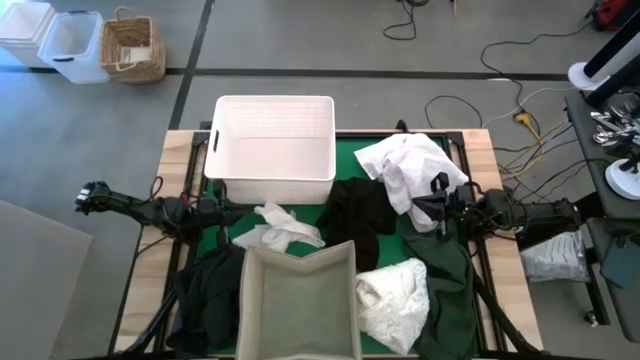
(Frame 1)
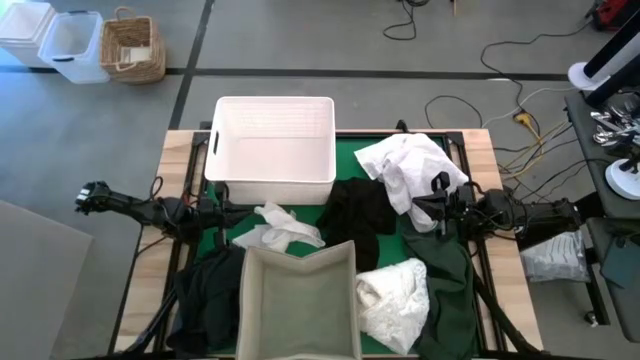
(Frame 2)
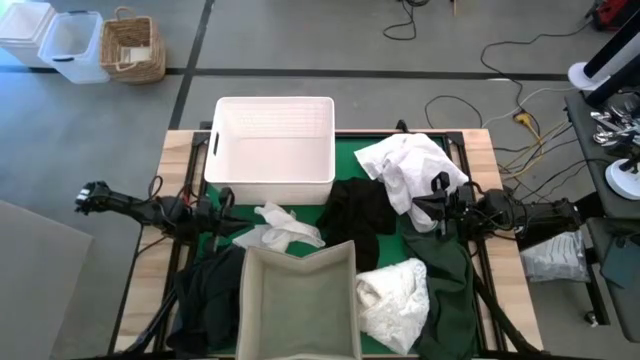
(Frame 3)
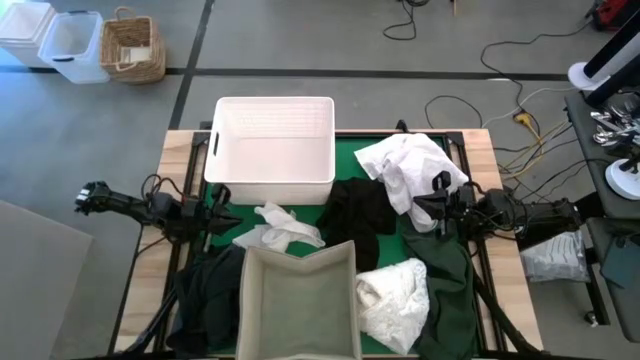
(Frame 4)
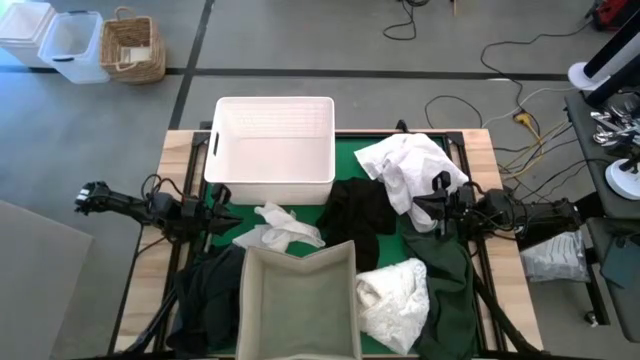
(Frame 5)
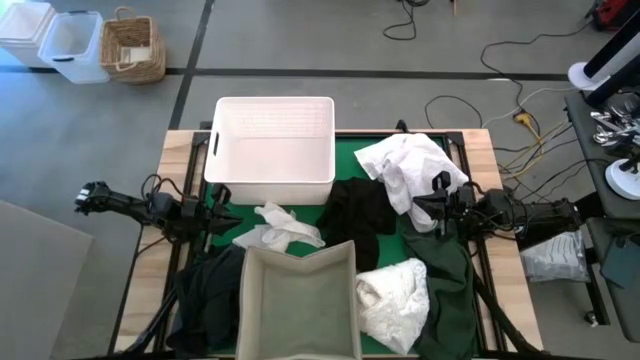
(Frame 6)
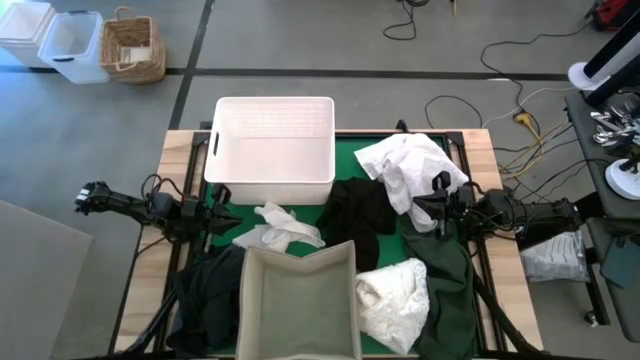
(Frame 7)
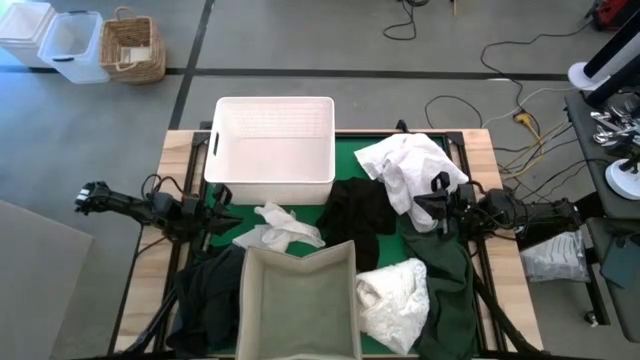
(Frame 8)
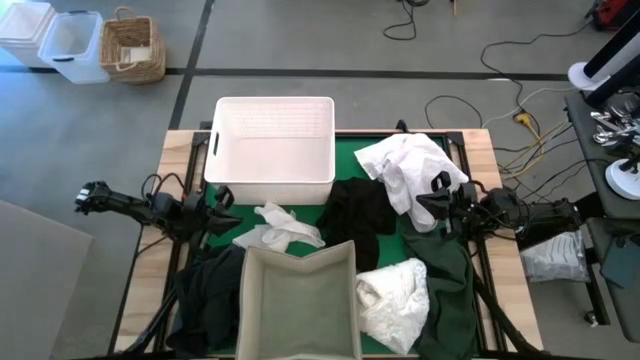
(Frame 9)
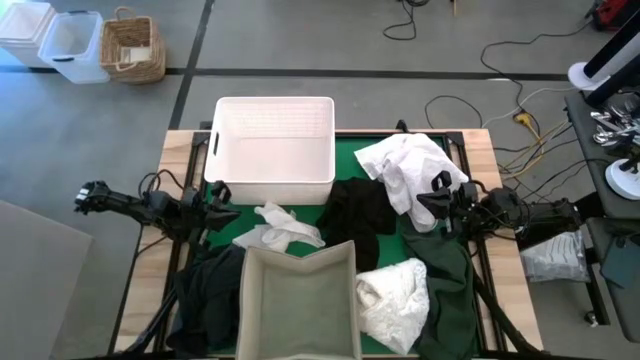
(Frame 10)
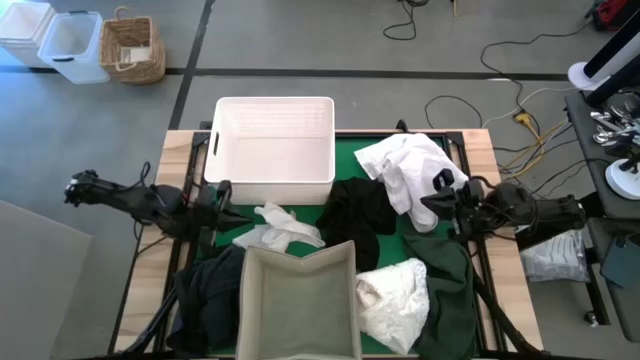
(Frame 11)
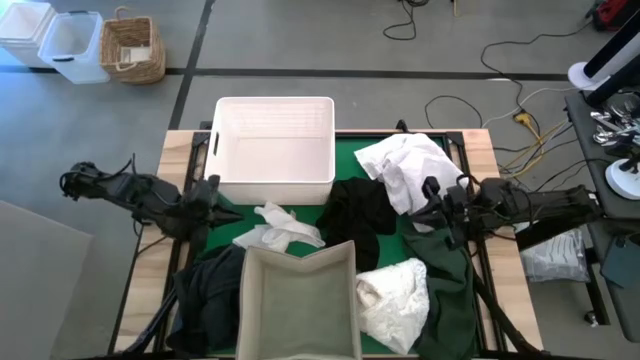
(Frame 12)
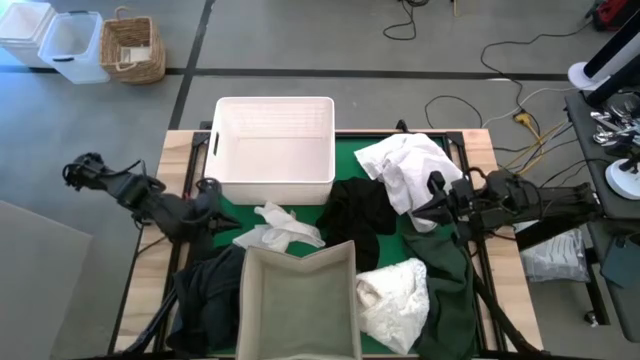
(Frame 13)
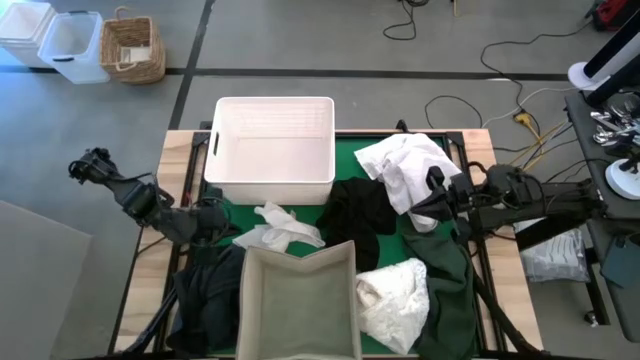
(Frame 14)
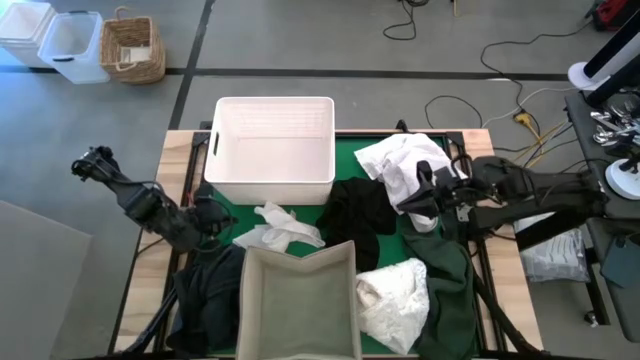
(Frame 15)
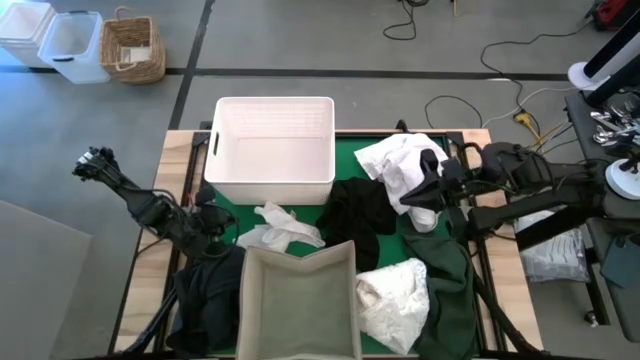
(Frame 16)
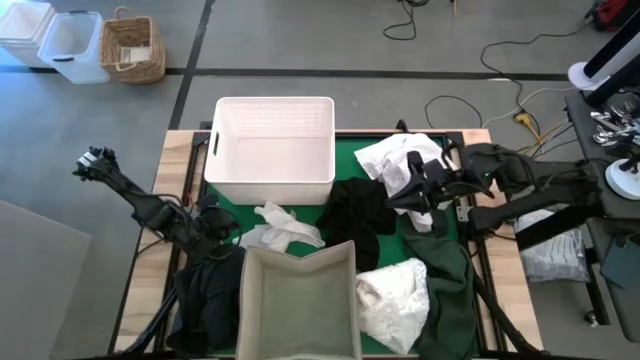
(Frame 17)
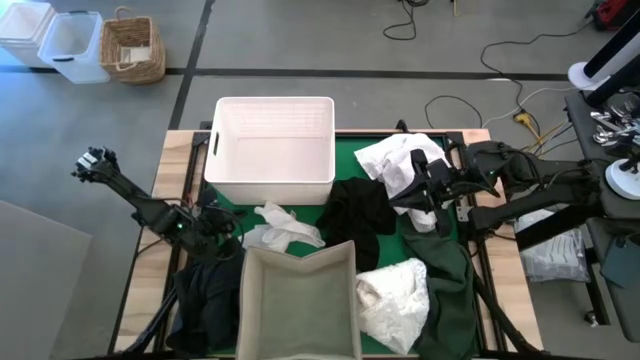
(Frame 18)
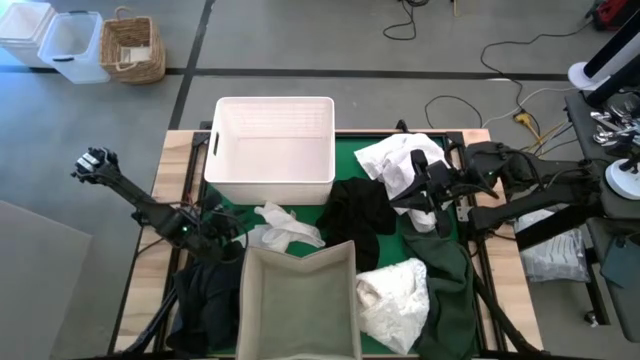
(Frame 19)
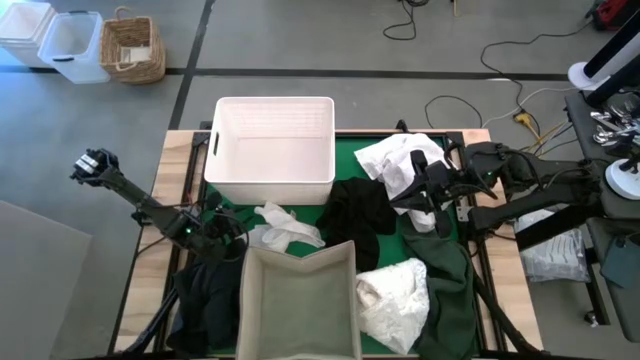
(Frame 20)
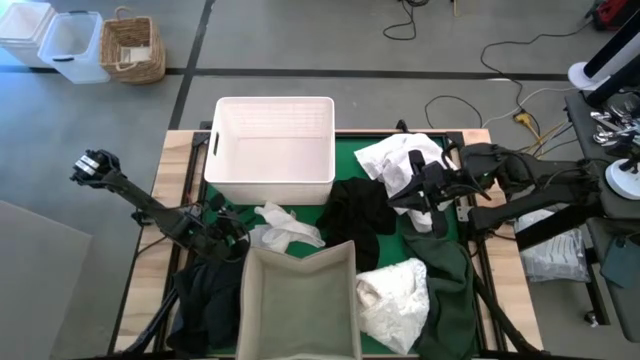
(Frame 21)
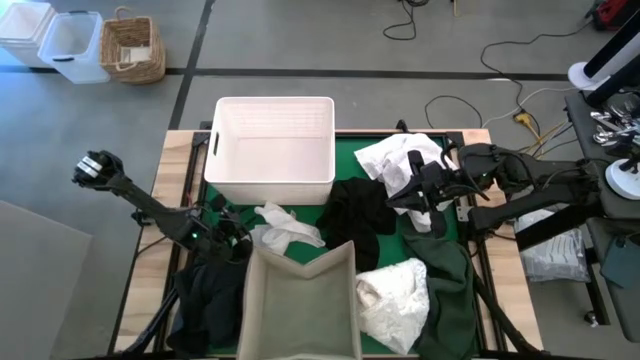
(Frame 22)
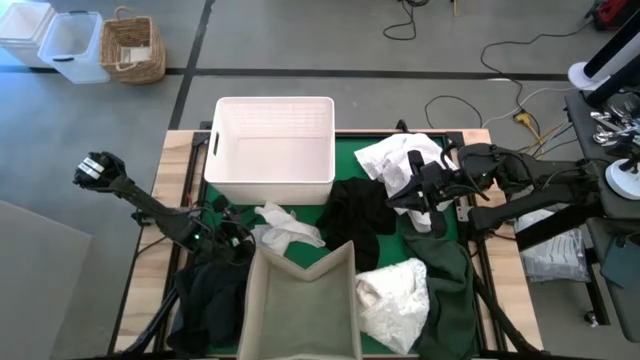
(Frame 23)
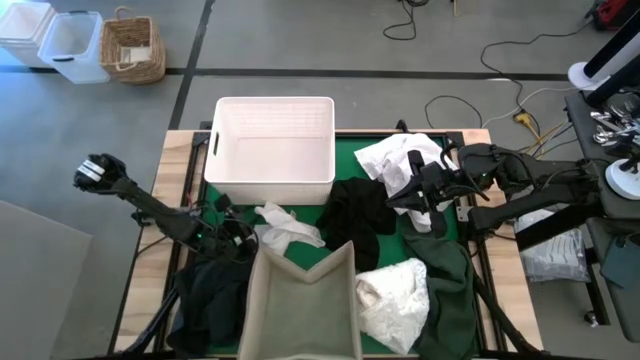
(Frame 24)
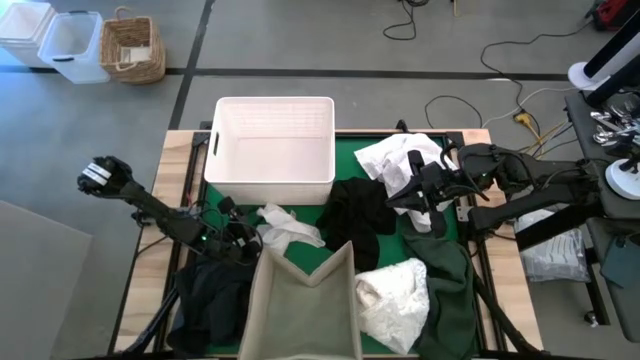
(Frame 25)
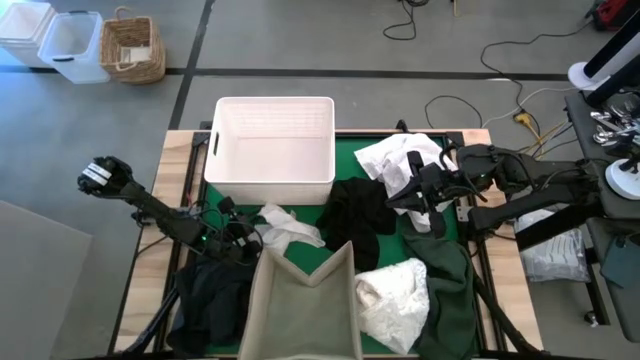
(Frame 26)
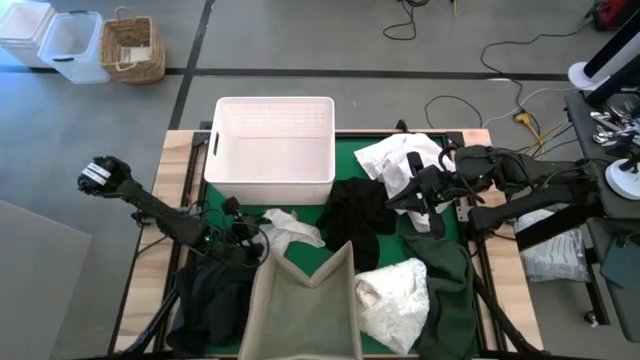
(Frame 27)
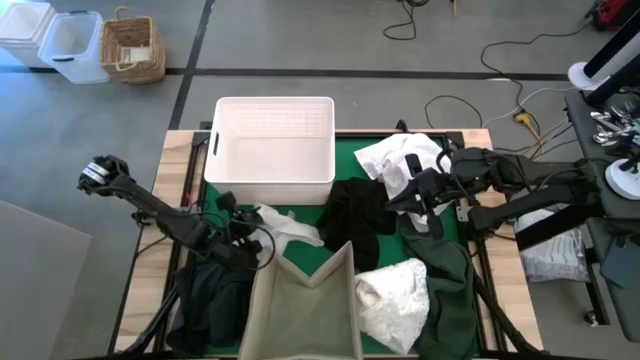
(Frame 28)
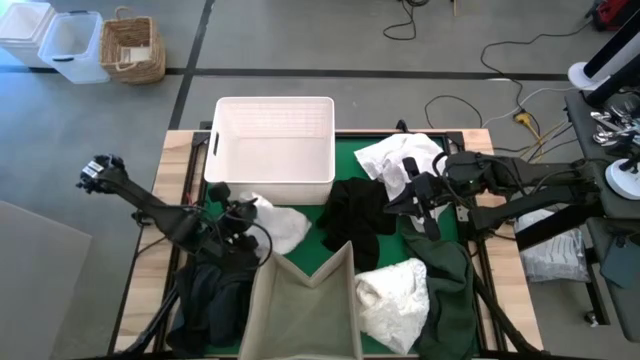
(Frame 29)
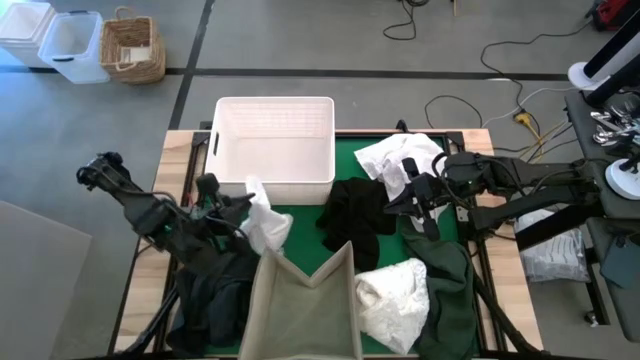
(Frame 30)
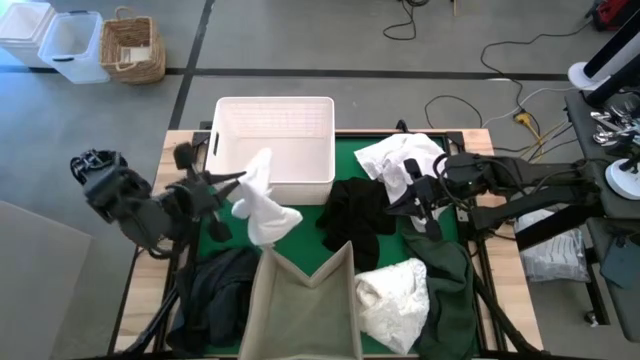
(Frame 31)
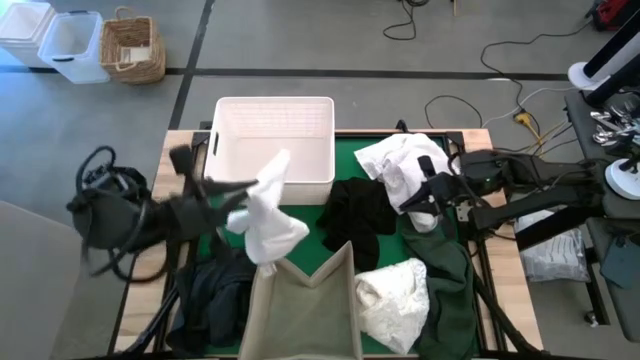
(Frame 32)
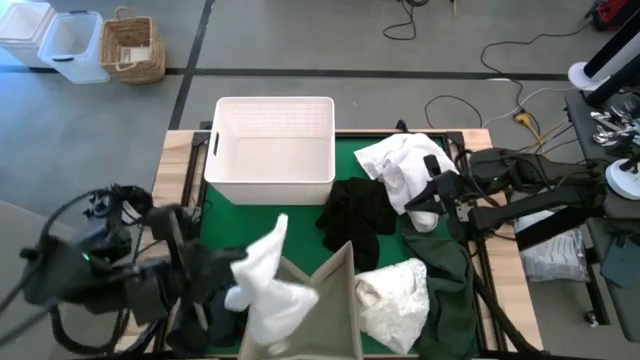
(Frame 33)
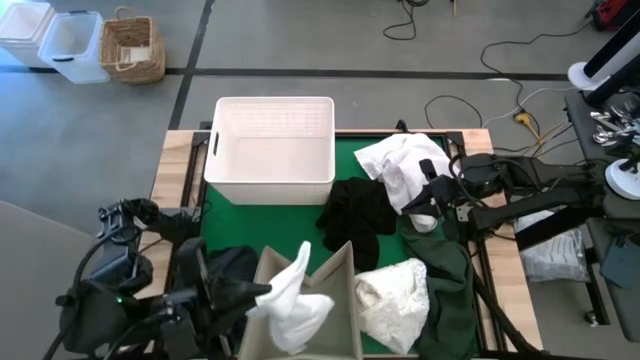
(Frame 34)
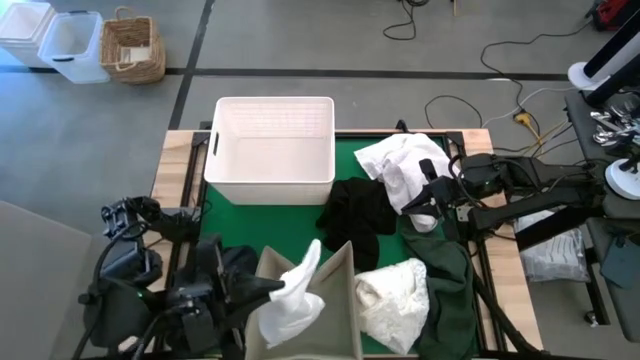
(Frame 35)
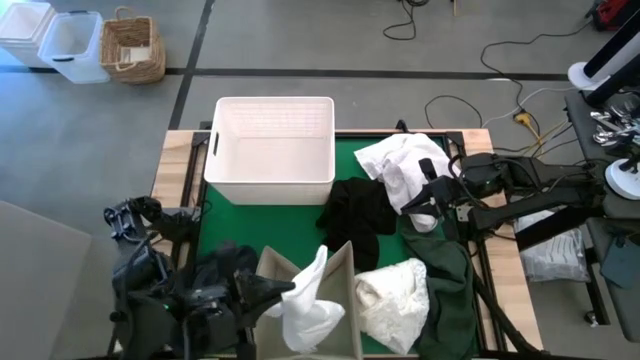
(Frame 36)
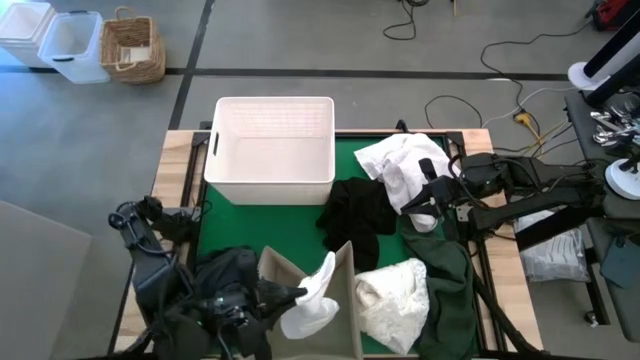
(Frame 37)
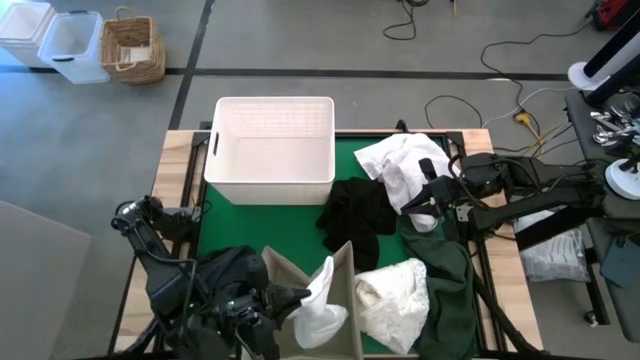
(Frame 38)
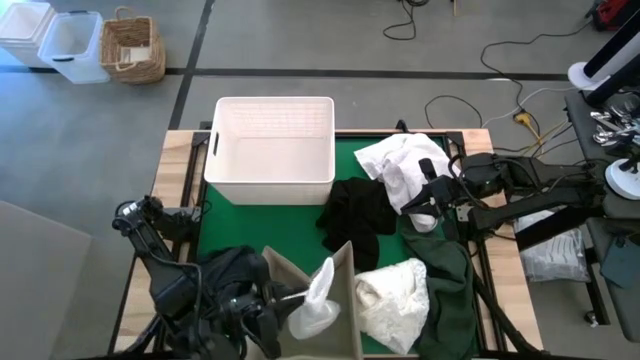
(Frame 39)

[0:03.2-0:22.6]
Put the white shirt into the brown laundry organizer
